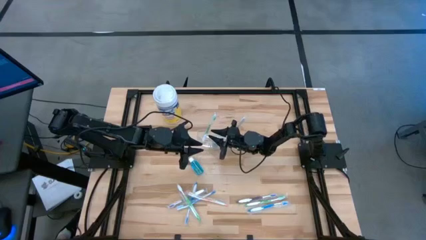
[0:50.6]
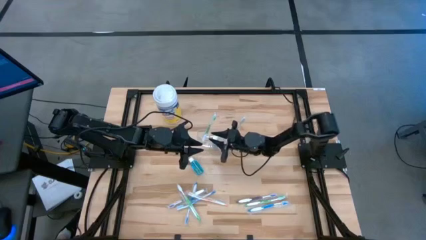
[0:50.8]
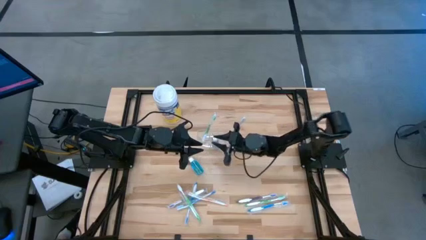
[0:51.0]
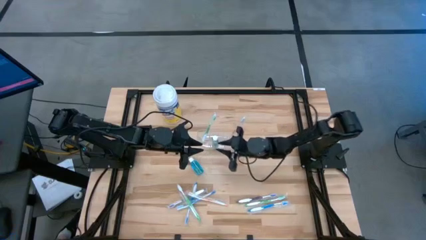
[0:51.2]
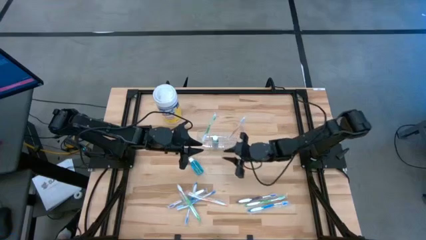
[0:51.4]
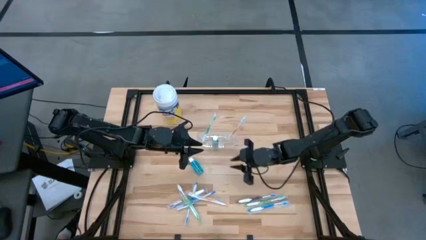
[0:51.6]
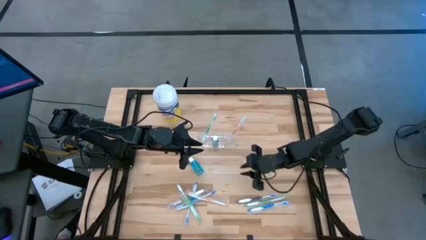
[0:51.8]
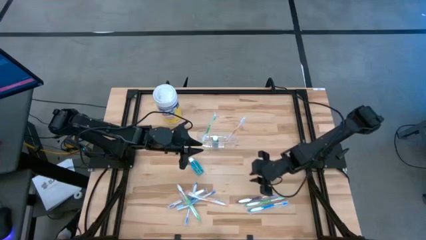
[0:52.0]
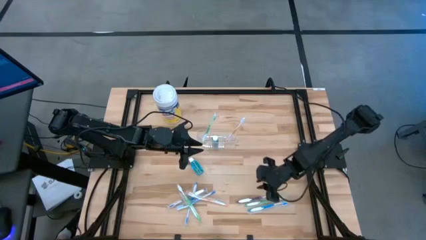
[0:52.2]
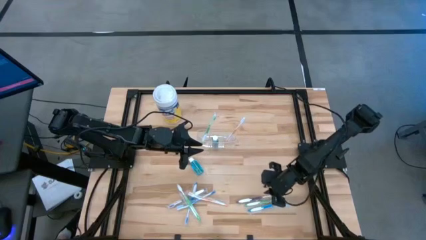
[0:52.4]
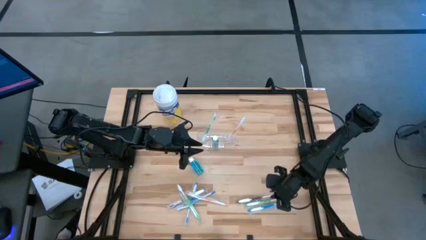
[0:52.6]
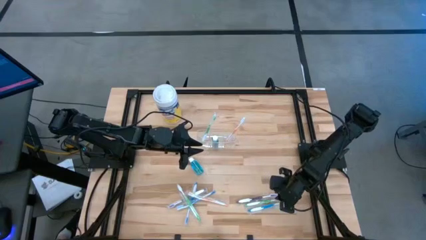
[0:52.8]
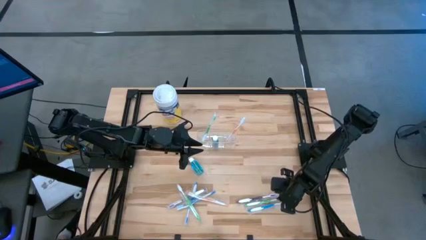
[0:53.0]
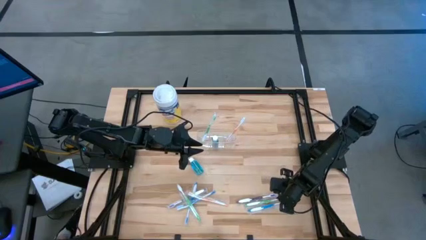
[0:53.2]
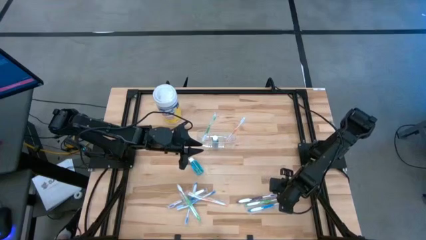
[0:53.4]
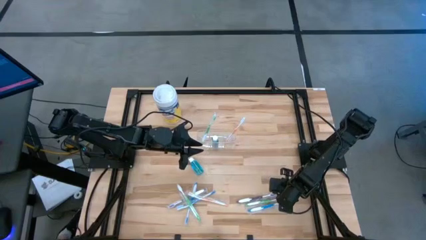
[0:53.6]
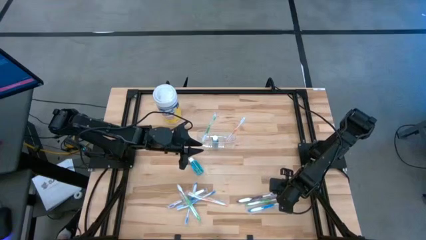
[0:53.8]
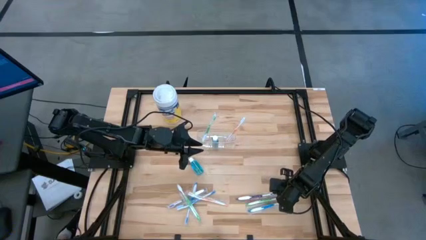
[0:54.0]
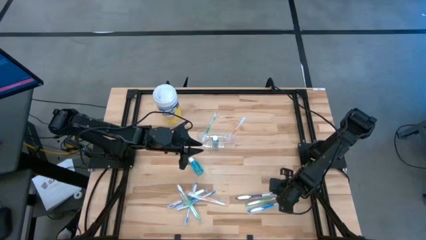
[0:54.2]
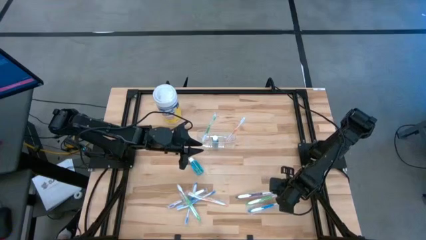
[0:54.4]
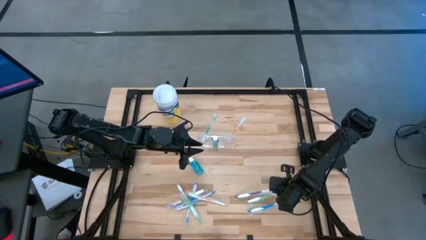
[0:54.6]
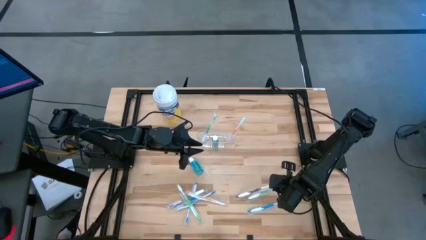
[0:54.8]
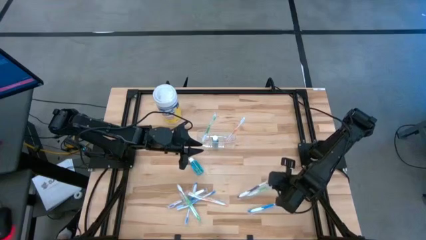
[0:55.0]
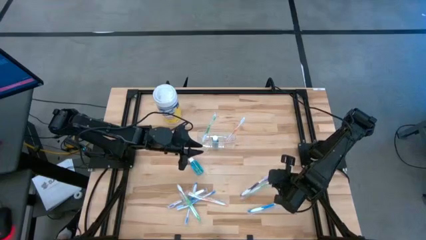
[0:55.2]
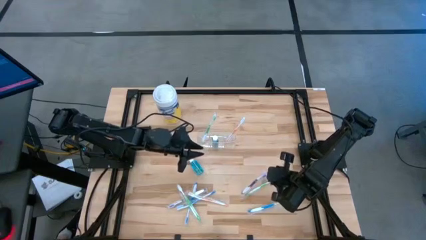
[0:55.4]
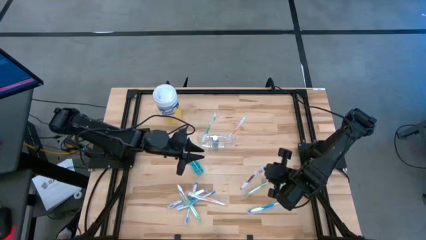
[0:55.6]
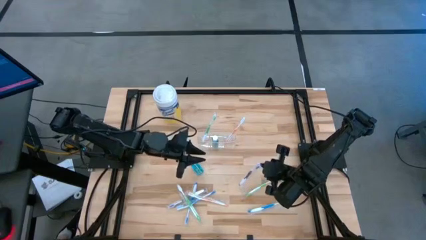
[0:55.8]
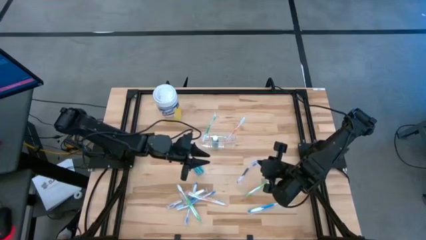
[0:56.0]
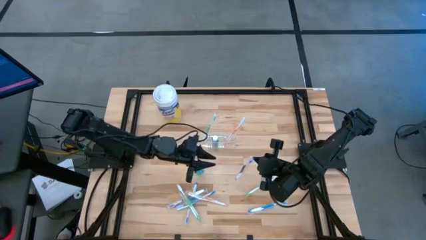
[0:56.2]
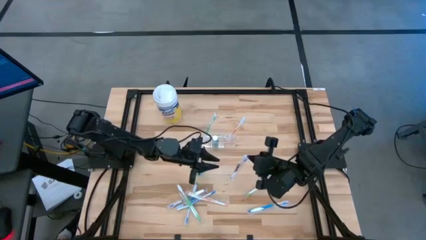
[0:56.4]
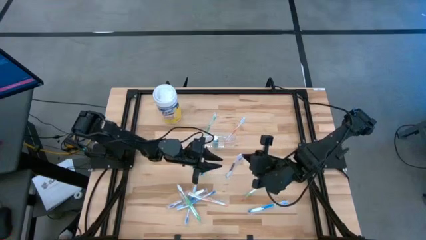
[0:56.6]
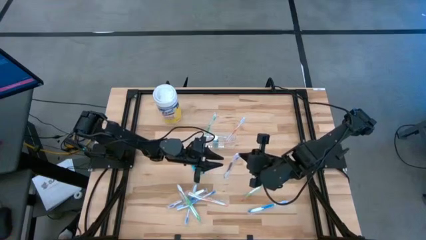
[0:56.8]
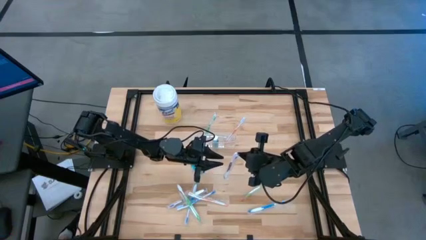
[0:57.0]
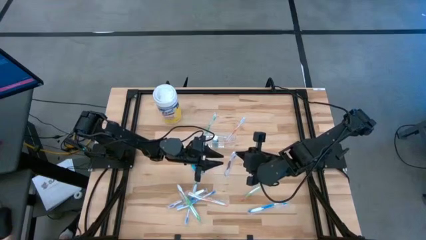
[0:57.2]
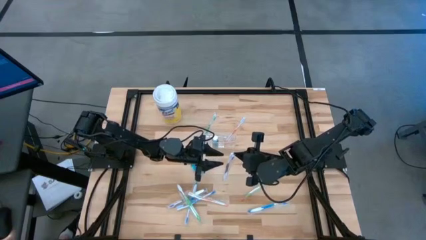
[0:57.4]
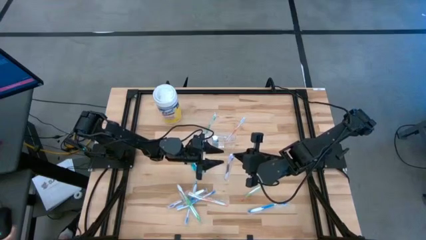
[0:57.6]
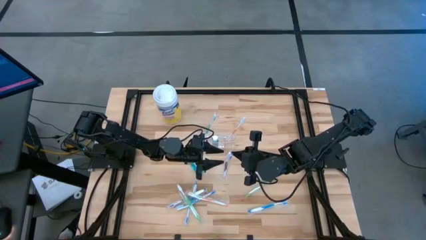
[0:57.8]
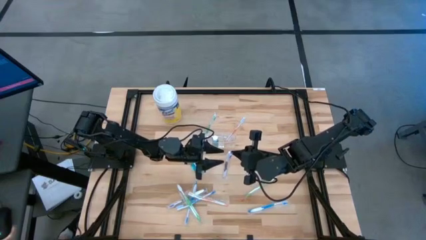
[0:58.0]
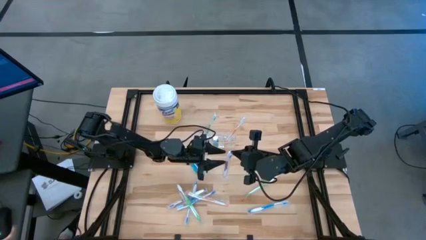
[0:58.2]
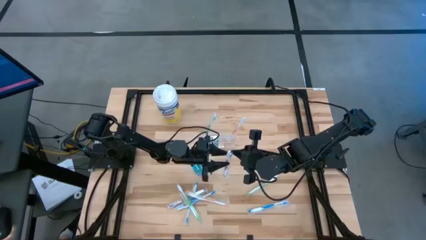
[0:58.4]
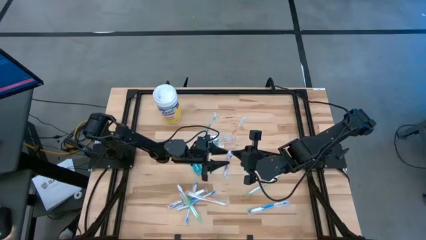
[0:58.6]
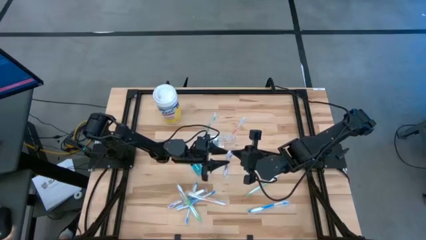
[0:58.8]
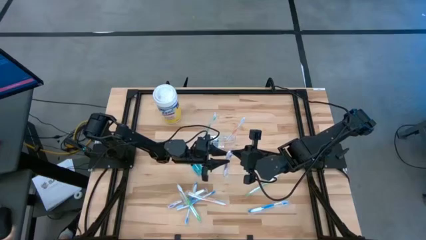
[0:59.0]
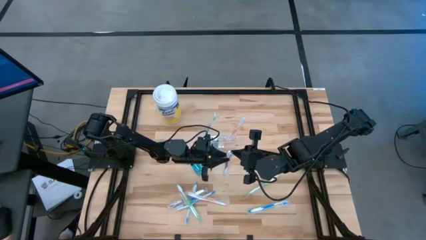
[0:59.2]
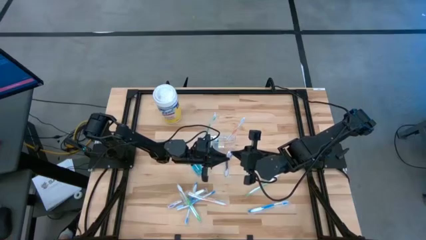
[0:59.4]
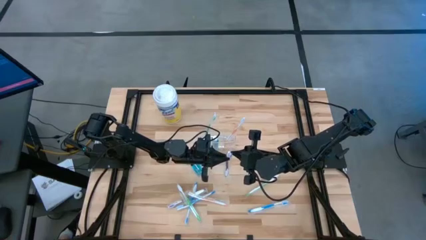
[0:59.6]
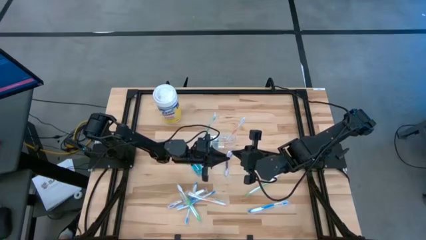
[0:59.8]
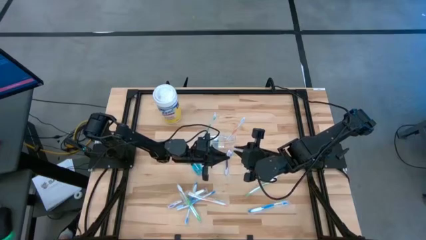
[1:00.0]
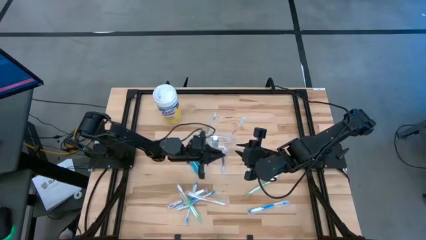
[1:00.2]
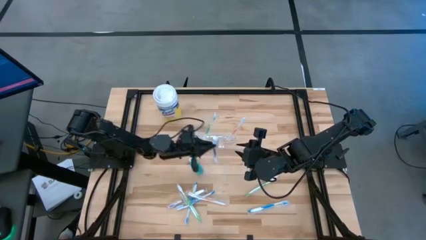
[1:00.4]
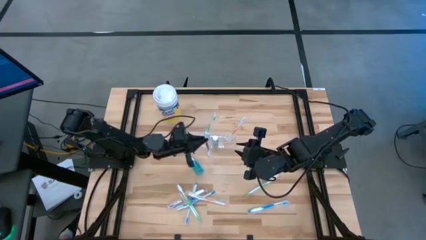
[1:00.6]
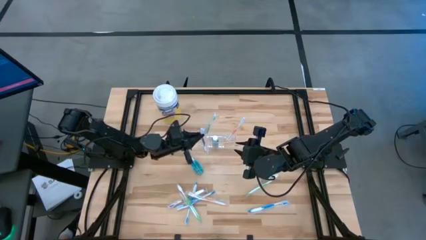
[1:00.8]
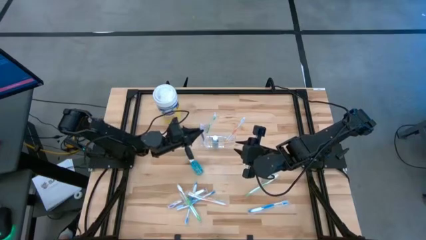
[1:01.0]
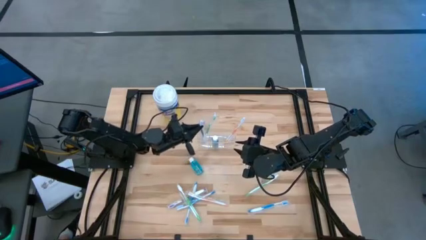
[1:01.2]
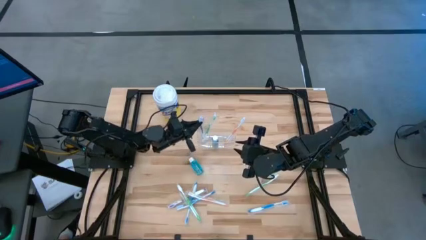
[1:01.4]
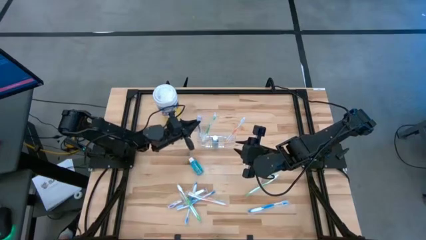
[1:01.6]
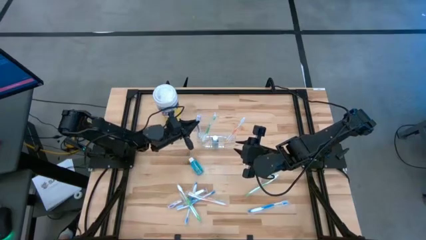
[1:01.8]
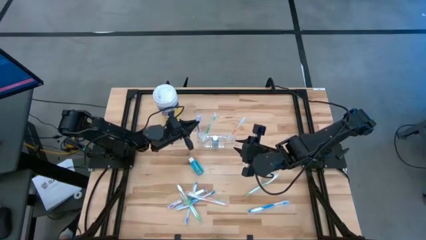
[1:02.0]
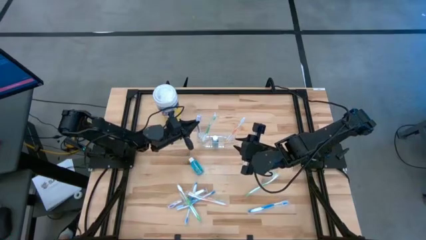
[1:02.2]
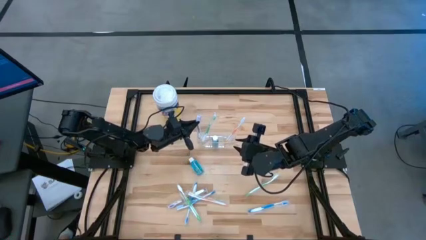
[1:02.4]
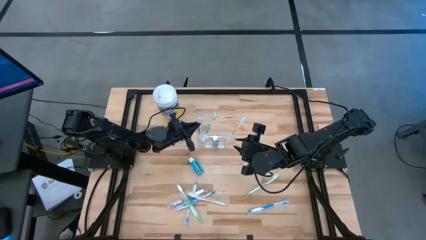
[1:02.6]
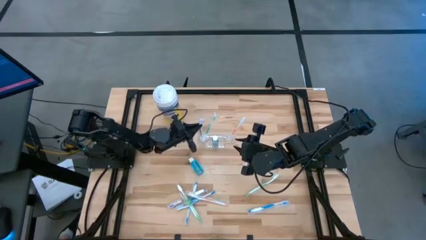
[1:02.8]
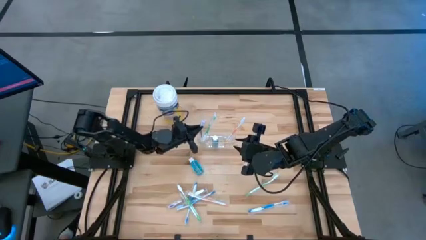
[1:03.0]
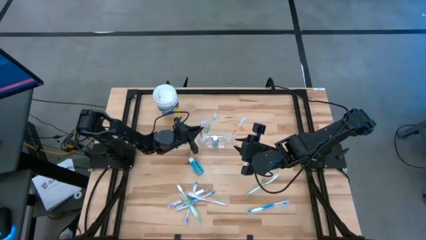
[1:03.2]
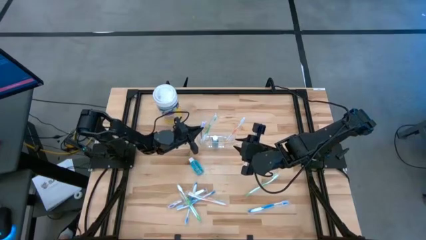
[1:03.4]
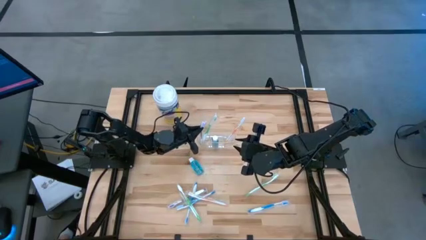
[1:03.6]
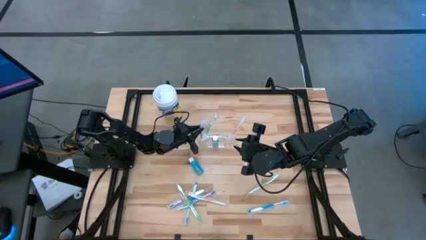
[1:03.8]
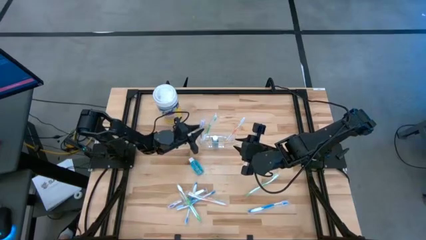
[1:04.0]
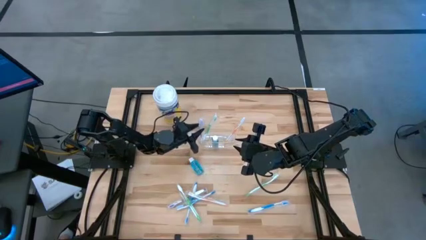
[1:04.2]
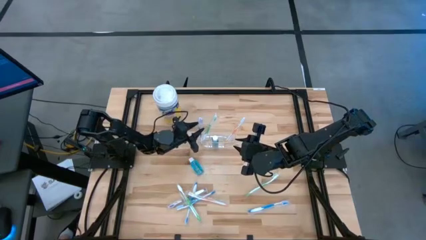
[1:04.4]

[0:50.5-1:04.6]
Task: Pick & Place toothbrushing station
Put the right purple toothbrush into the transparent organizer
